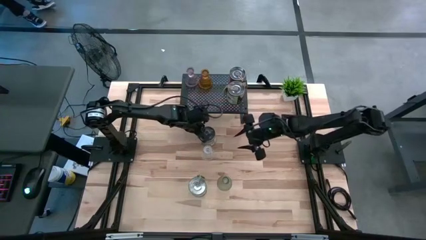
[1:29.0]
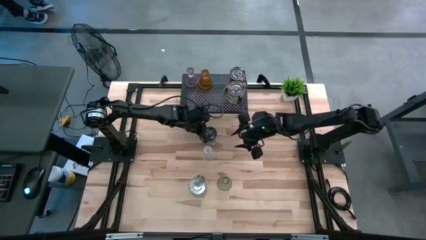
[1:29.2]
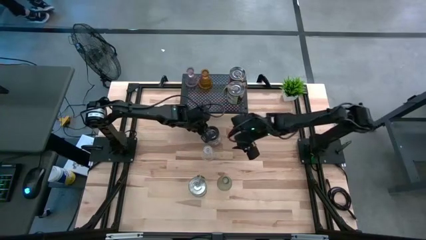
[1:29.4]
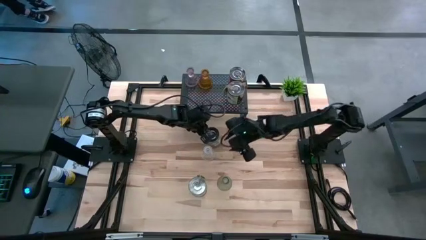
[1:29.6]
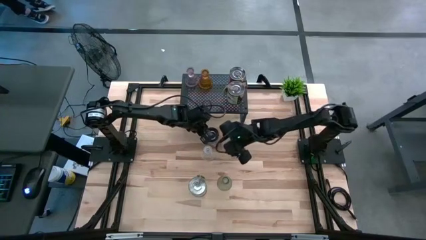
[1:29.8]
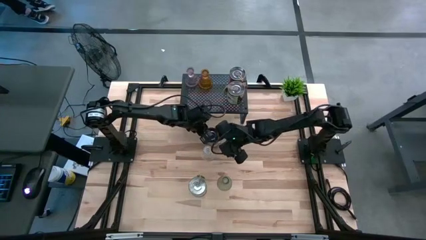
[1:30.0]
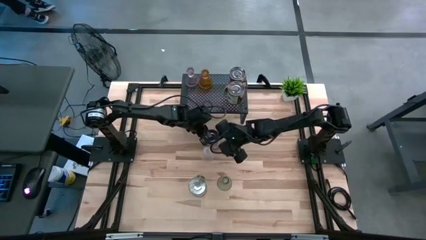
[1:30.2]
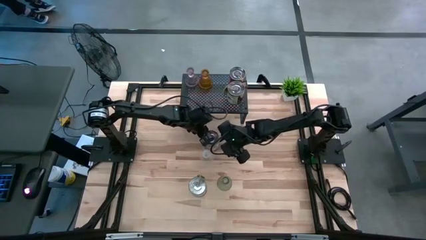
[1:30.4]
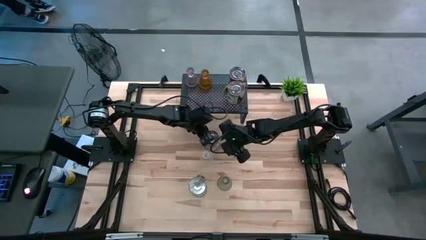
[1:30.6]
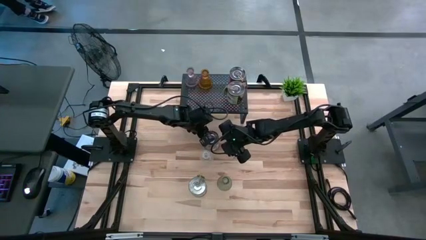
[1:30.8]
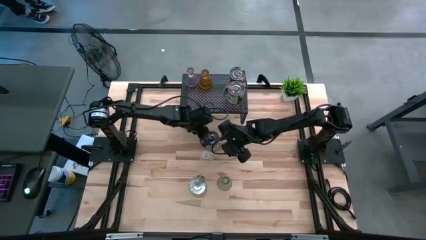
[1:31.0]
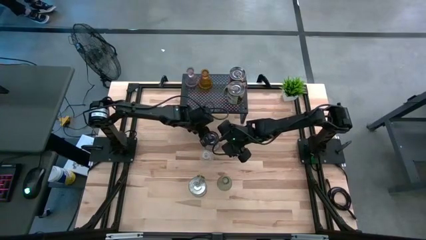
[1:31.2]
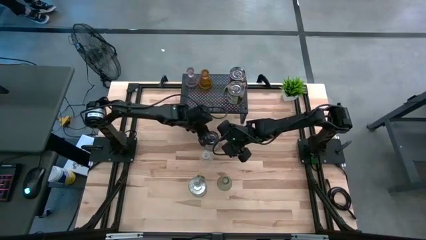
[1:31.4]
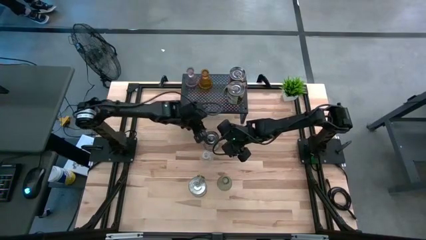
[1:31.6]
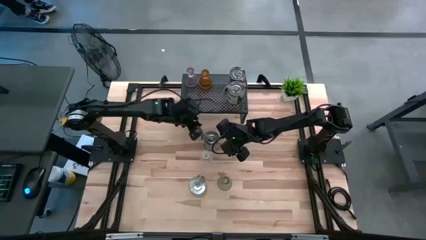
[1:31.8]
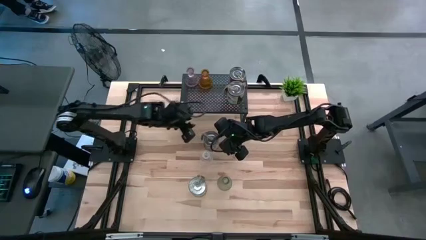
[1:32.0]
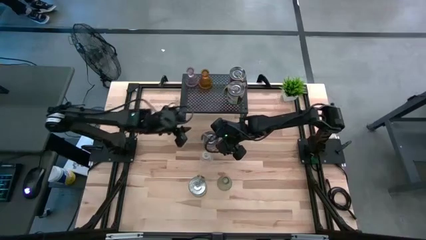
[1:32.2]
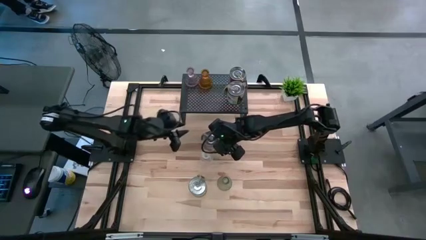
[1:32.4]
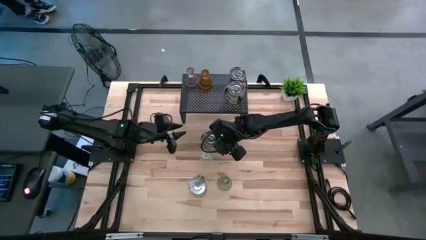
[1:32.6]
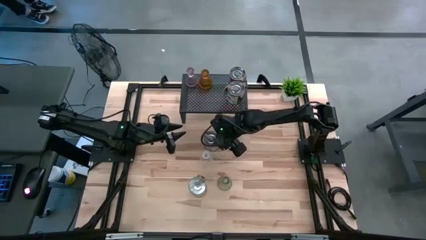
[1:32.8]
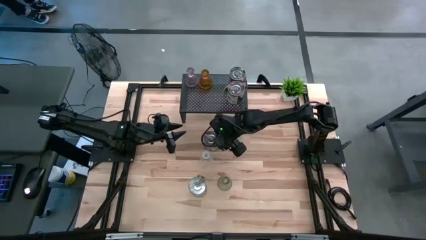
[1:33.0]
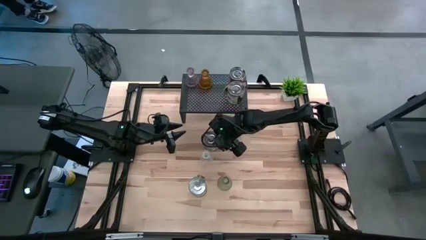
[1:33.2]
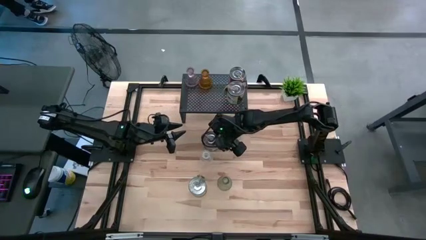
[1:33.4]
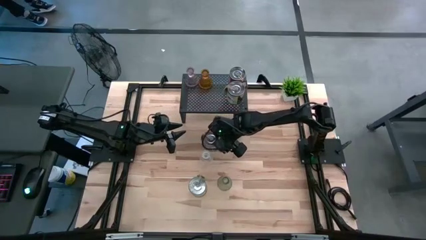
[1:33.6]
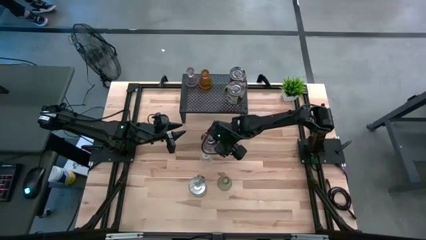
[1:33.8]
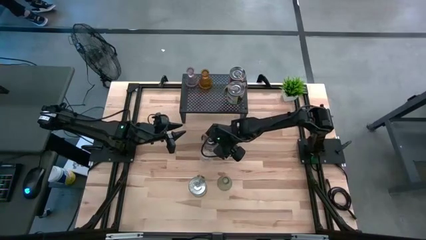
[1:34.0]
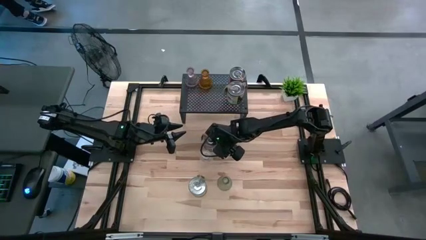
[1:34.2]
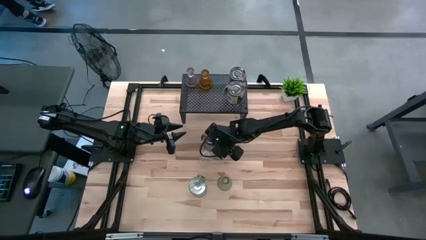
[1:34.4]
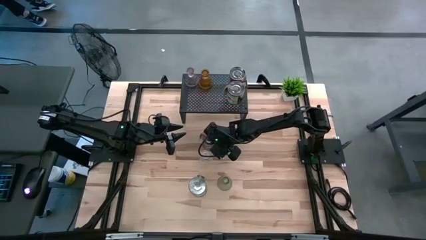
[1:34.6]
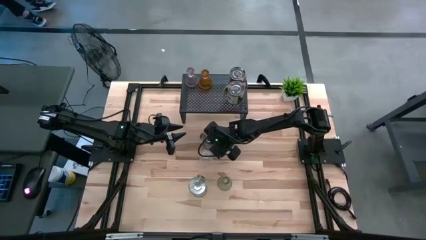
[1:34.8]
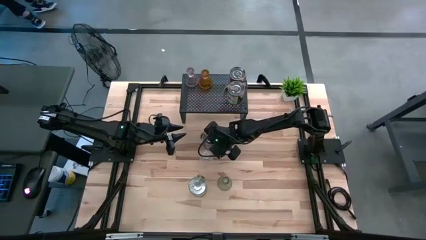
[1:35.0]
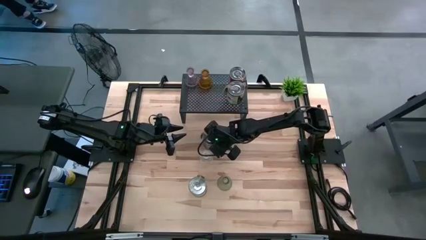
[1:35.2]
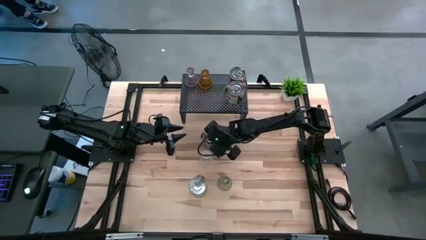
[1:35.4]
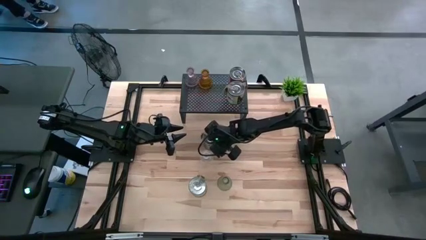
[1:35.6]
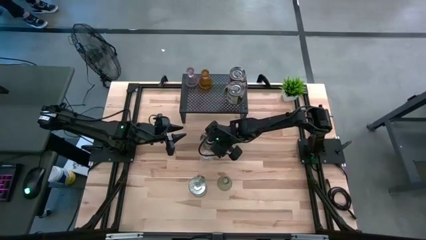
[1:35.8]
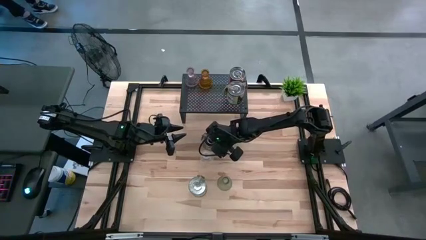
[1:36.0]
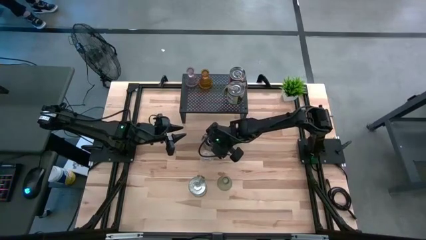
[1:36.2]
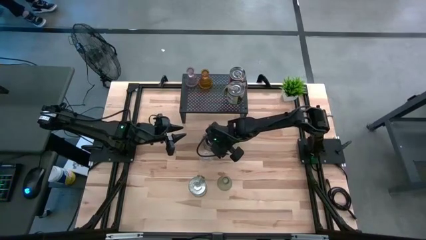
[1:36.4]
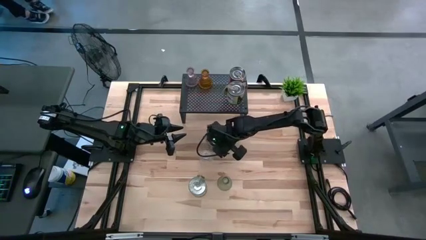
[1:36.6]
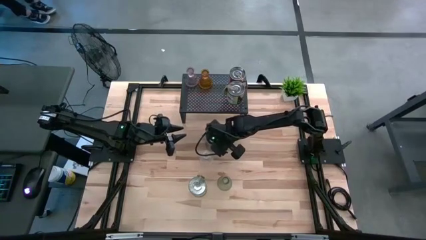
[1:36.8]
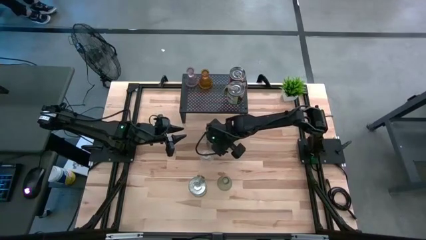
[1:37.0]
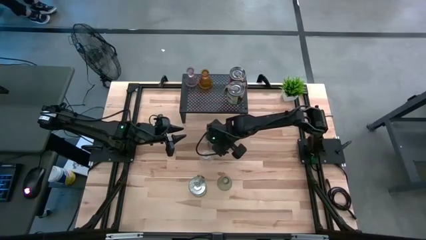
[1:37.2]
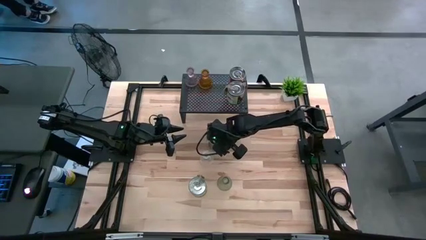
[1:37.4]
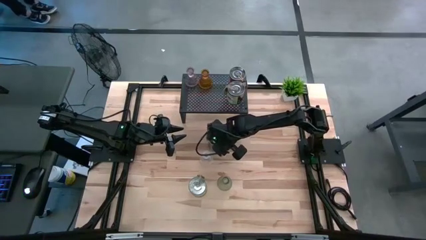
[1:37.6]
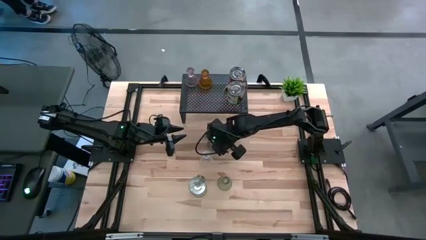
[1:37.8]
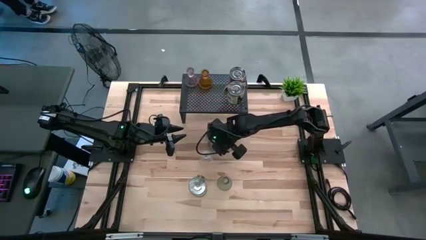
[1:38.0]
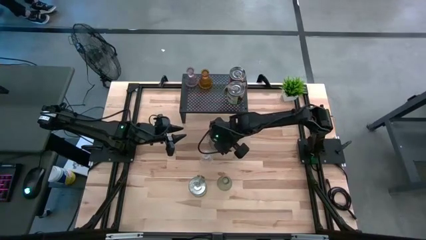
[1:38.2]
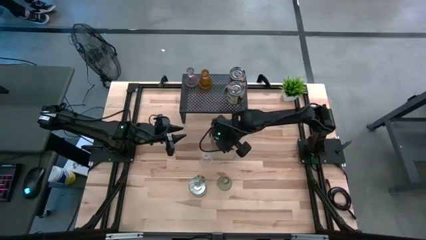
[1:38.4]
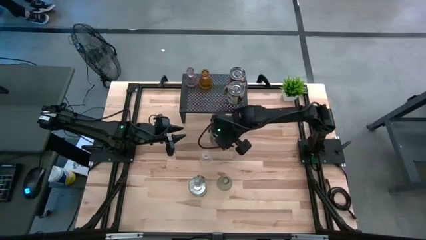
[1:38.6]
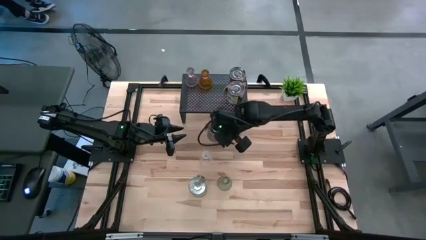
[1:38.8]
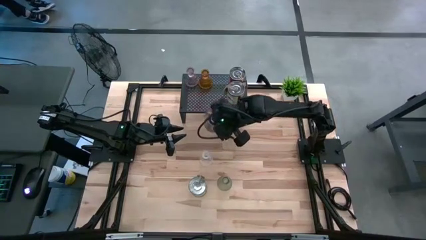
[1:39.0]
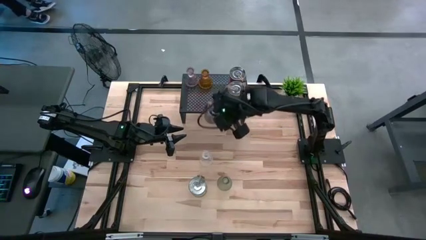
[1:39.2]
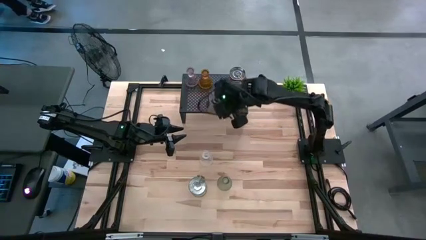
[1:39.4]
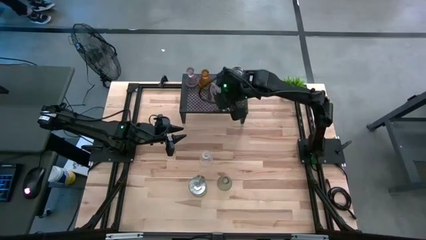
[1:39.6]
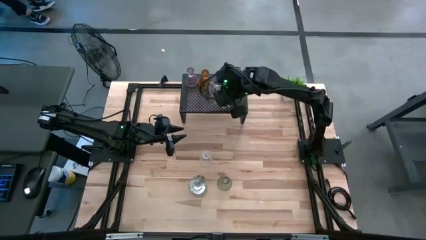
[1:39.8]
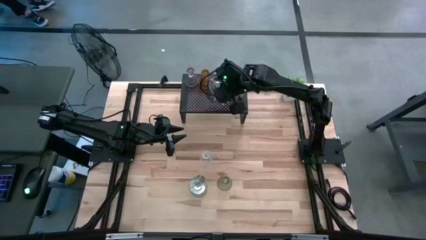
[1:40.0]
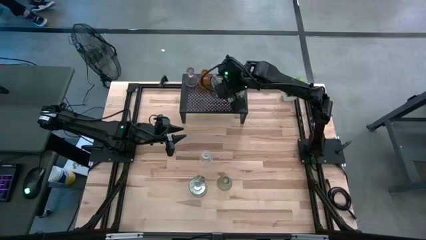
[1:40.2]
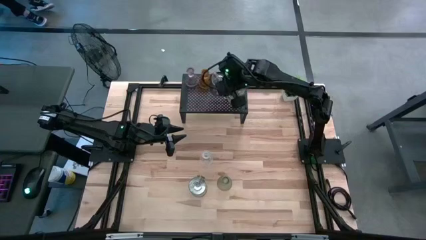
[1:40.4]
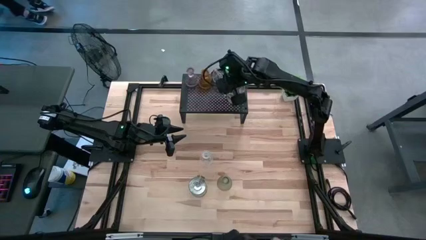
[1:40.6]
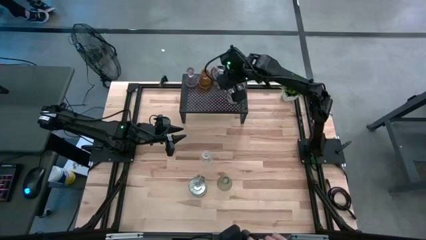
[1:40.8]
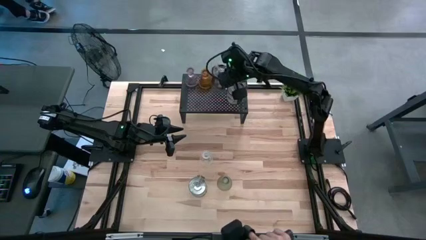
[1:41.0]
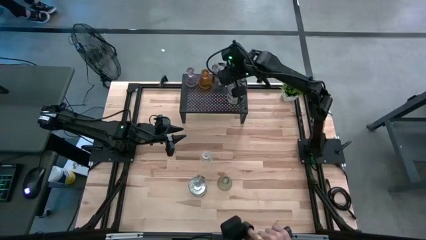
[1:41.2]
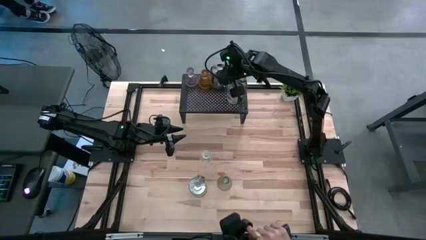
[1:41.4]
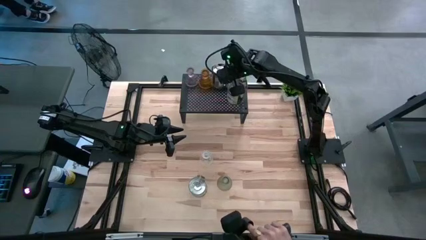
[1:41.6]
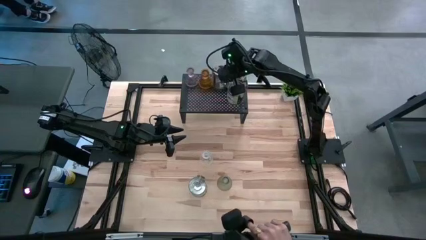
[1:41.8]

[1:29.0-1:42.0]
Task: Pick & Place candle stick holders
Put the brown scented candle on the shelf aligned with the other scented candles
